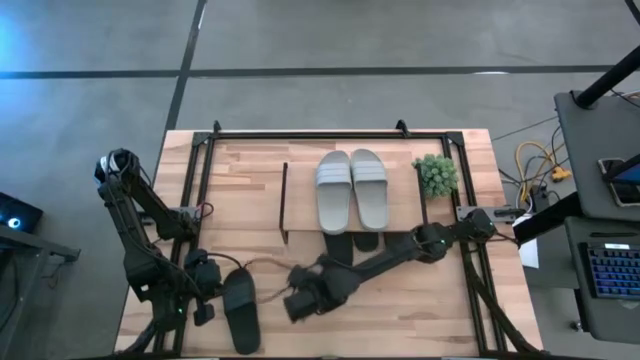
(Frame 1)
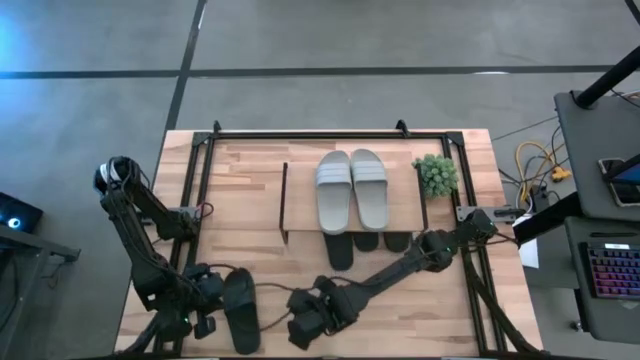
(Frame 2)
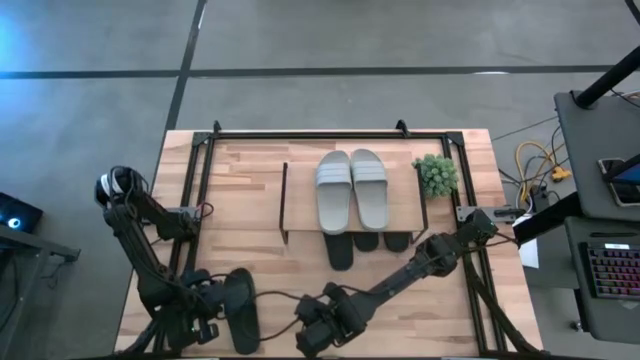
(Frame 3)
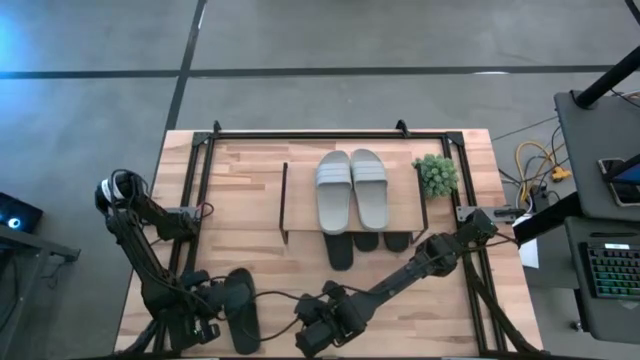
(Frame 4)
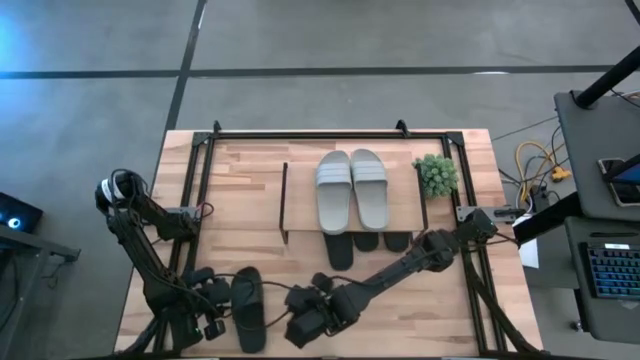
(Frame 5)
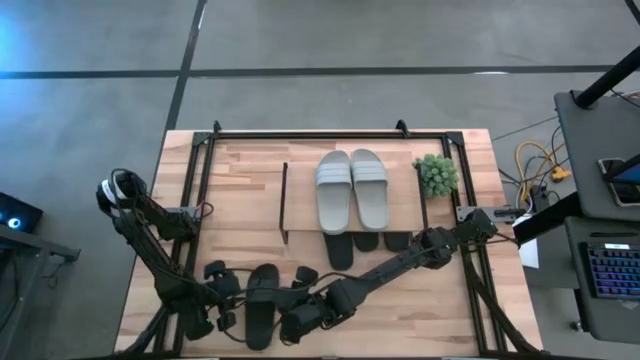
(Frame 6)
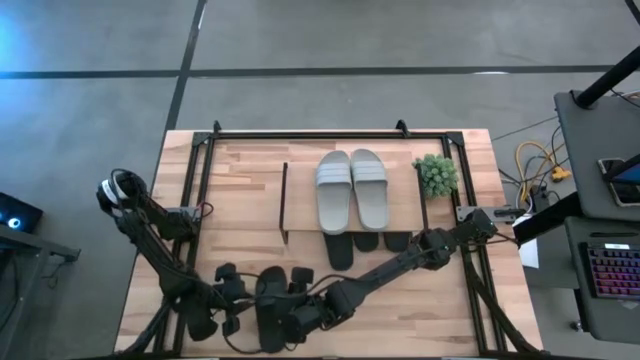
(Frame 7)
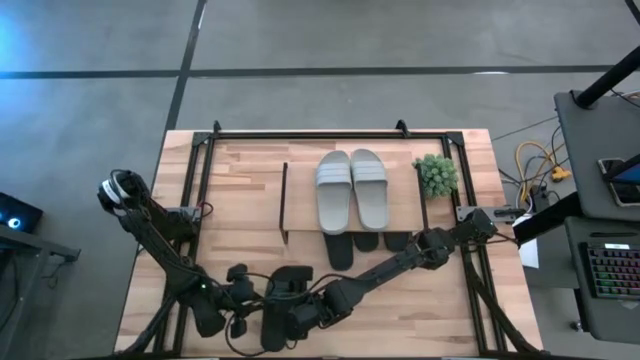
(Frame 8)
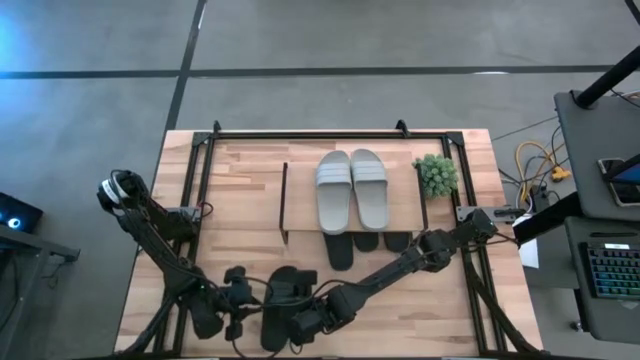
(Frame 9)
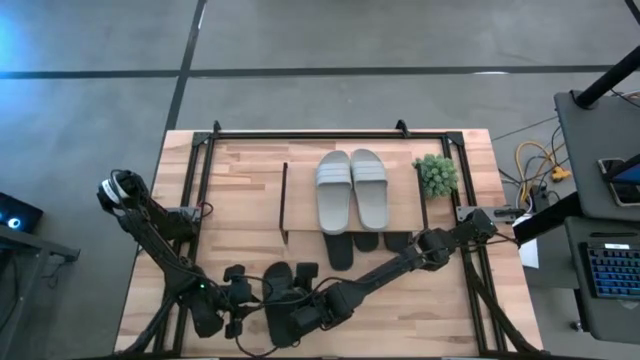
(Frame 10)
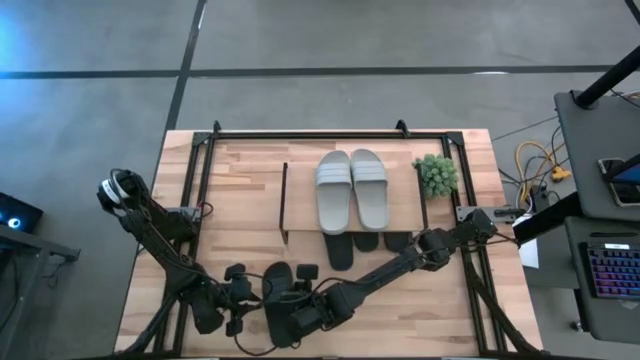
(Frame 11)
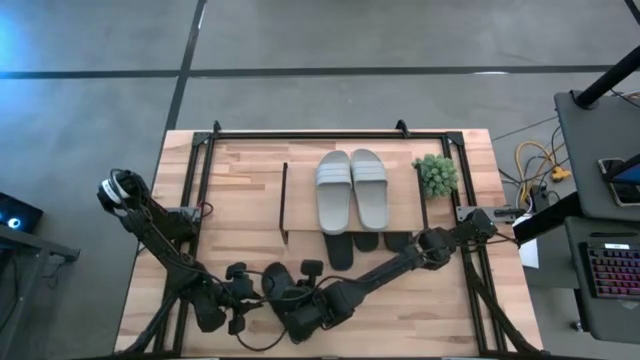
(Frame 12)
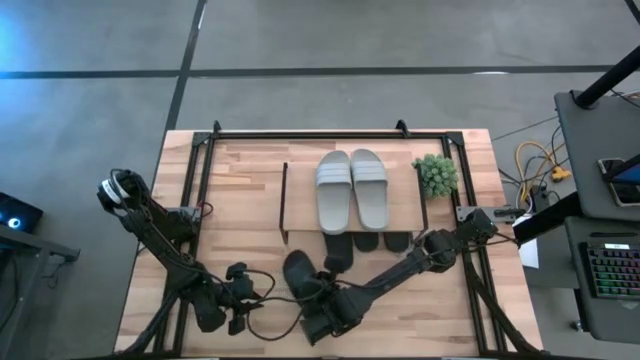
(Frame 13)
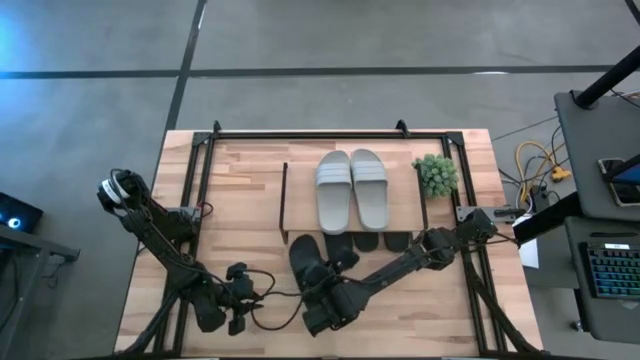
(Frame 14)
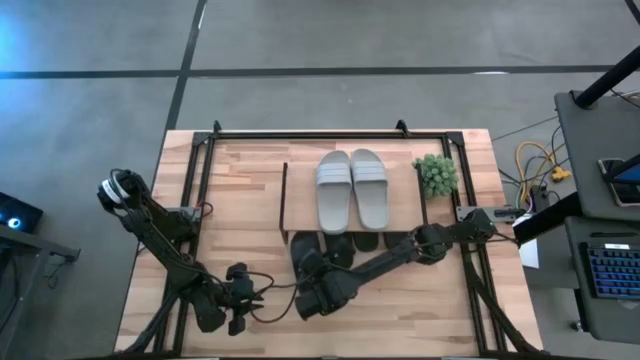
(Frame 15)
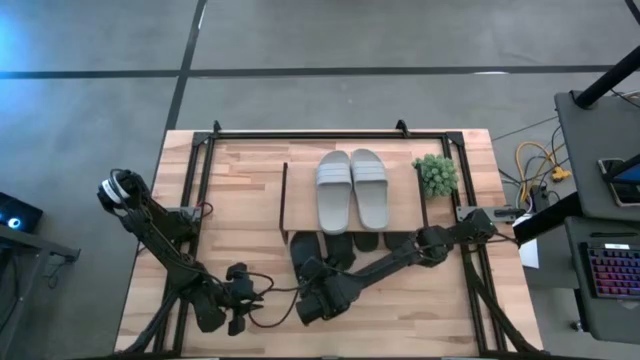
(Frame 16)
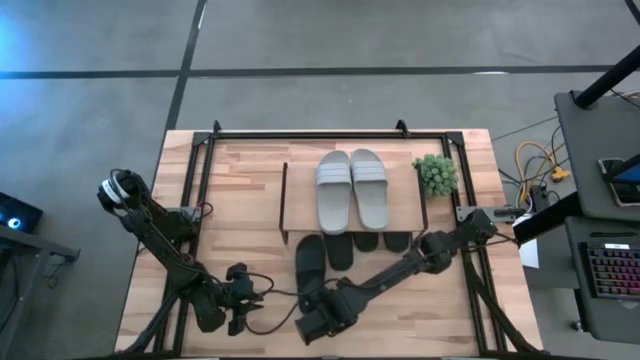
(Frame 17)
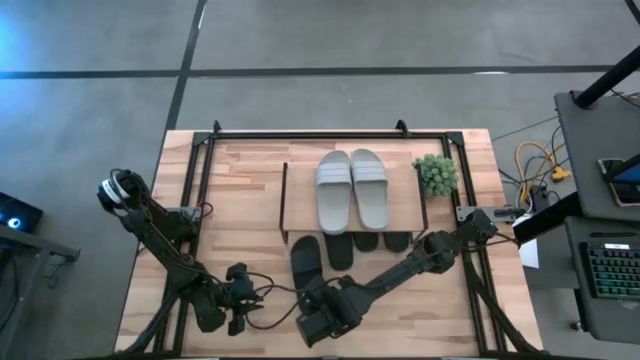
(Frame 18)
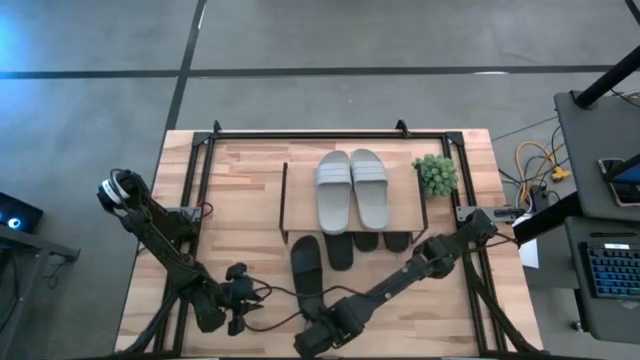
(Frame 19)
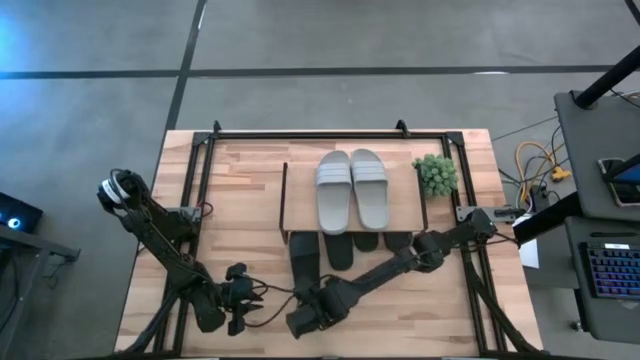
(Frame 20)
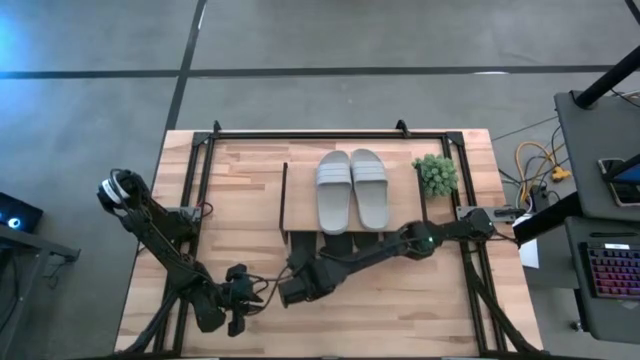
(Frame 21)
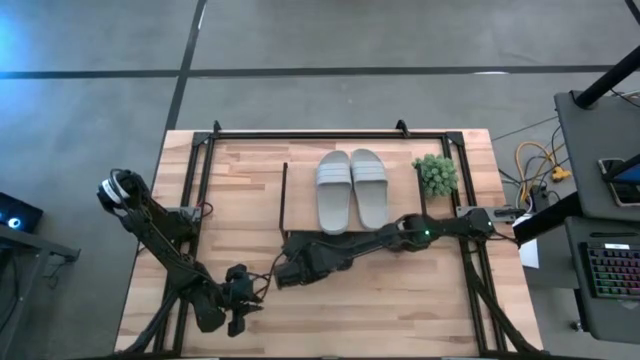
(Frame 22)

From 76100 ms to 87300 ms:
Task: Pick and place slides into the shelf
Put the black slide under the shelf

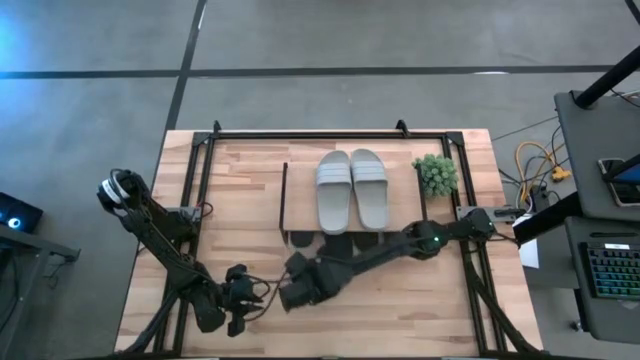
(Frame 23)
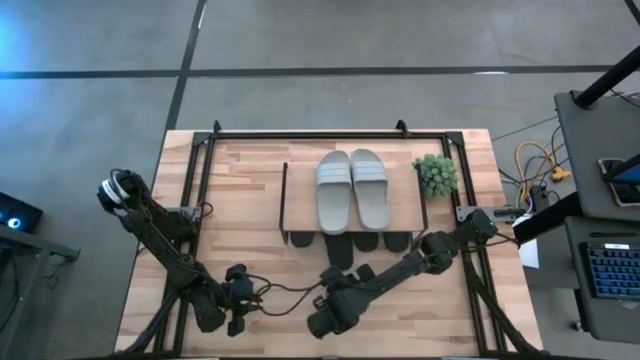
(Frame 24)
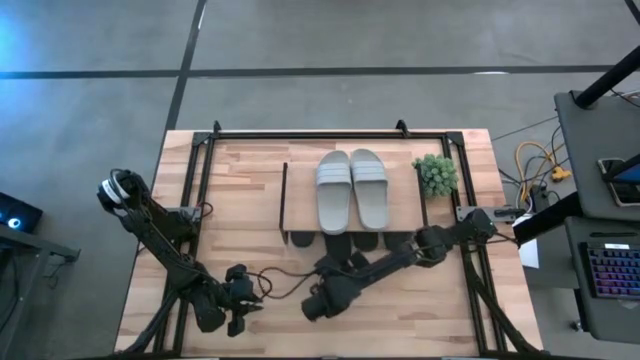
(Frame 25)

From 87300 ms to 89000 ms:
Adjust the black slide under the shelf

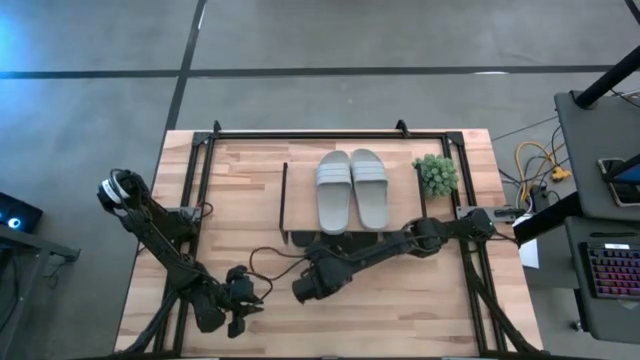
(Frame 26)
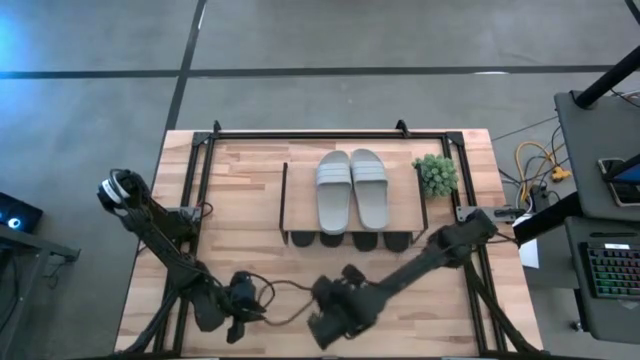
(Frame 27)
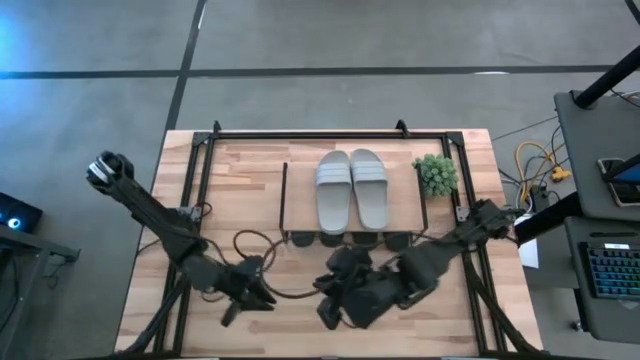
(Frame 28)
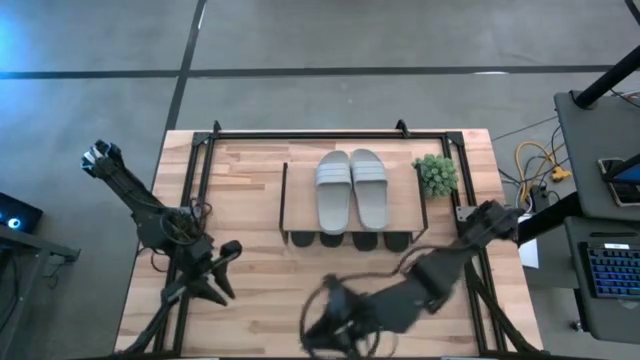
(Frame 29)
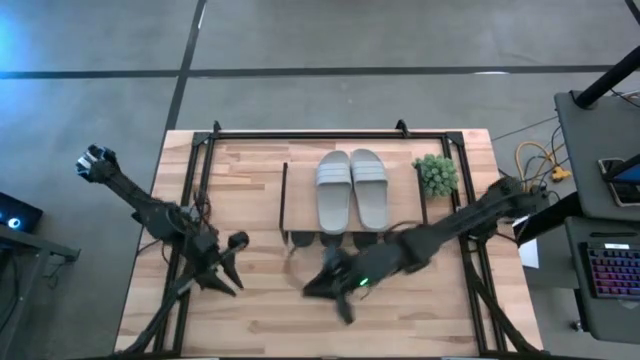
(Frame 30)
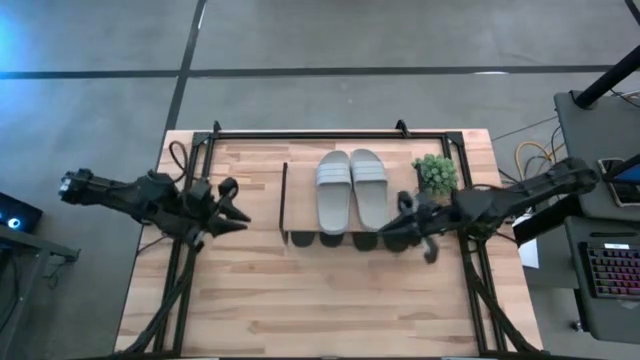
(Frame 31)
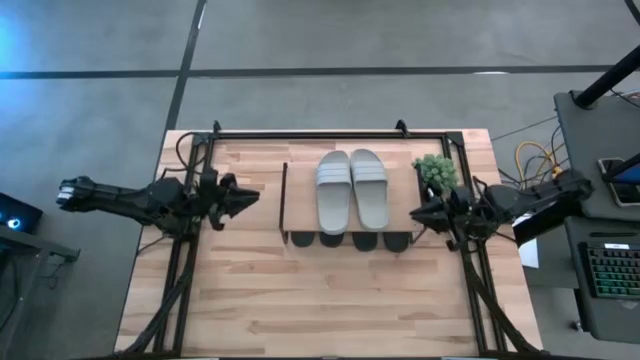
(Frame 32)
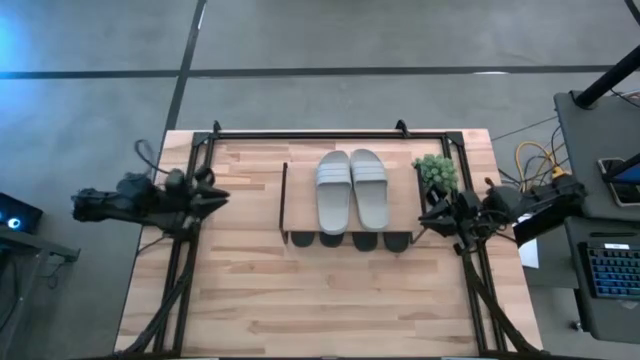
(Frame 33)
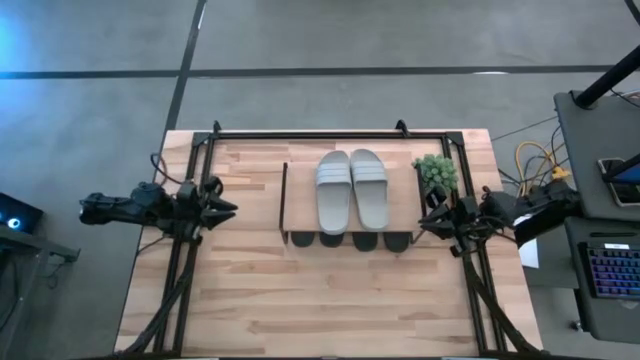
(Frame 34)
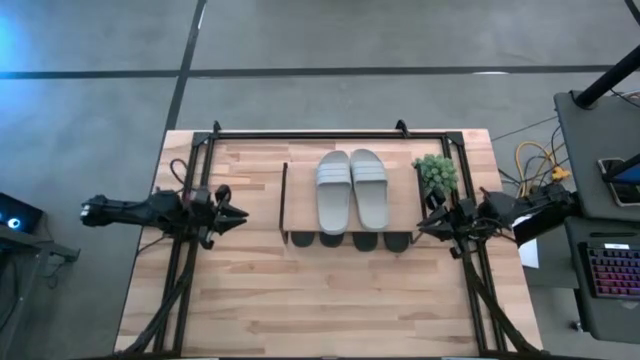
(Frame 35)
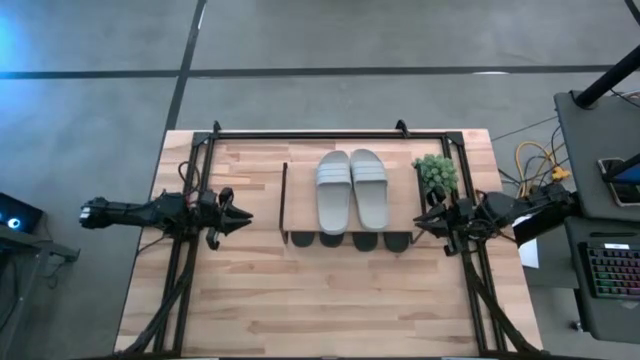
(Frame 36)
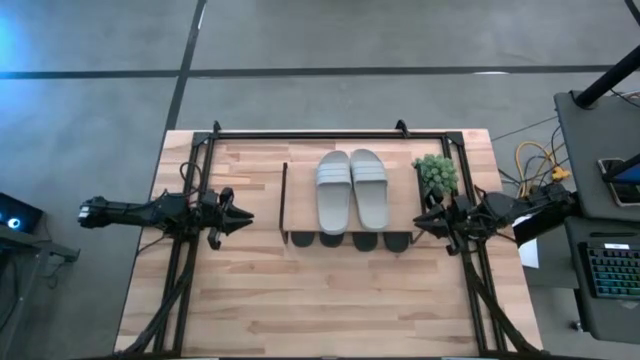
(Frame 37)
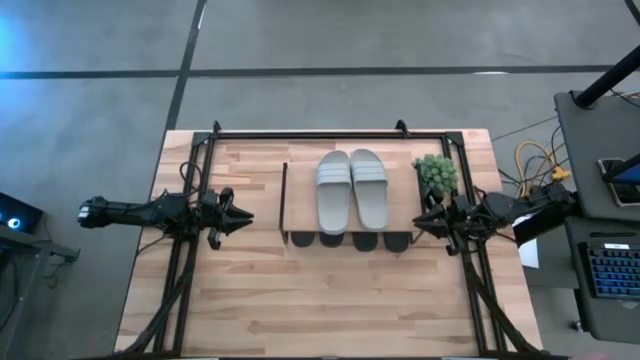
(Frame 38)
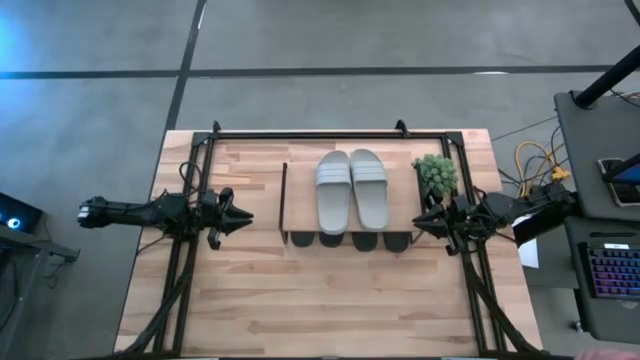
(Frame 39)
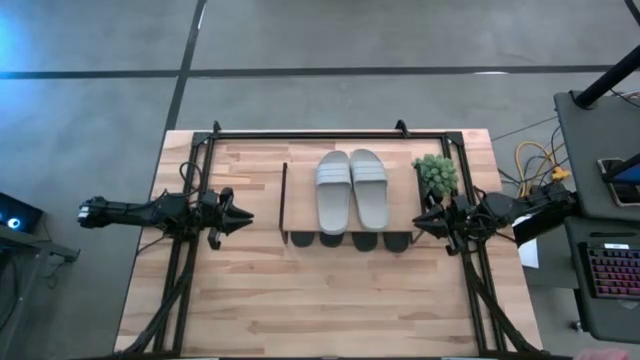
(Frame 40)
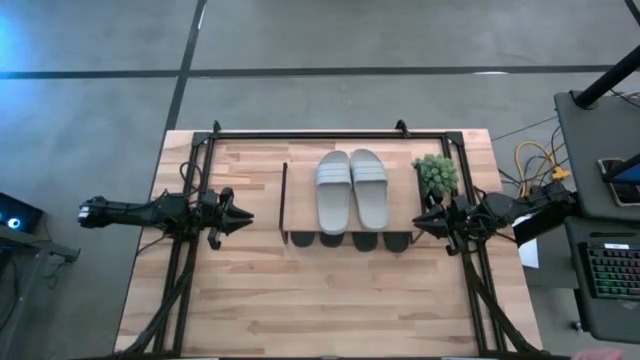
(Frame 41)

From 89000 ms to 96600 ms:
Return to Home Position

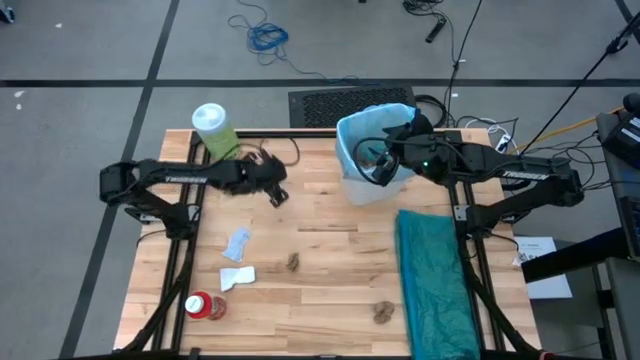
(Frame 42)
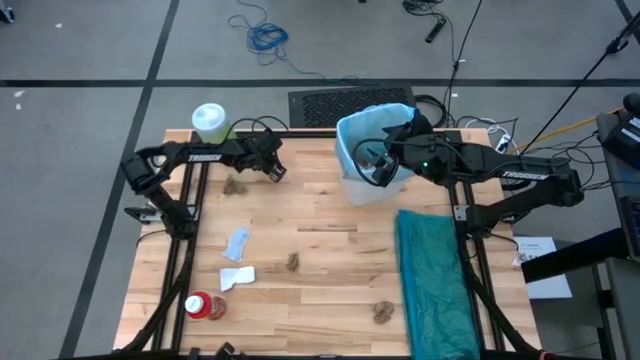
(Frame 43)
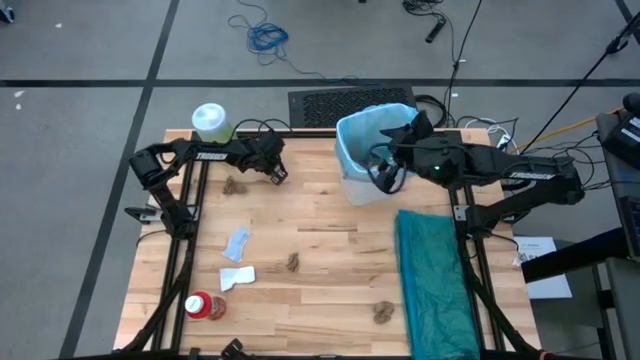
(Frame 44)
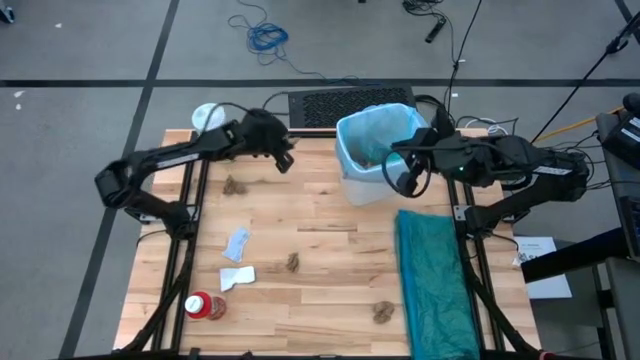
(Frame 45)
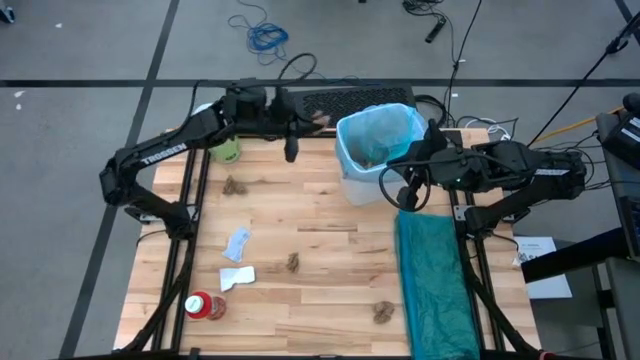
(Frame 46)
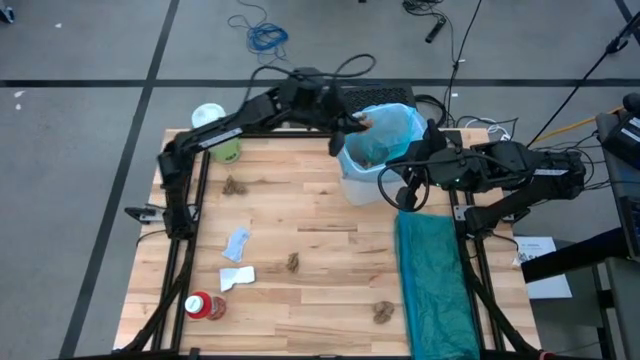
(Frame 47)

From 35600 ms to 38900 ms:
Task: place trash/remove bag and relplace
Put the brown paper trash into the trash bin
